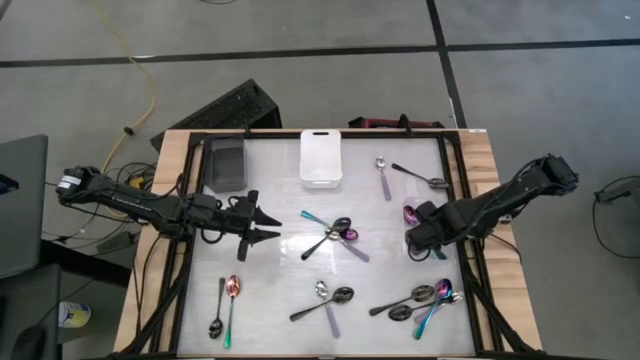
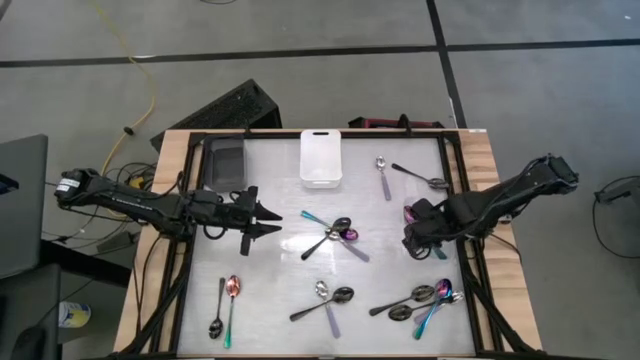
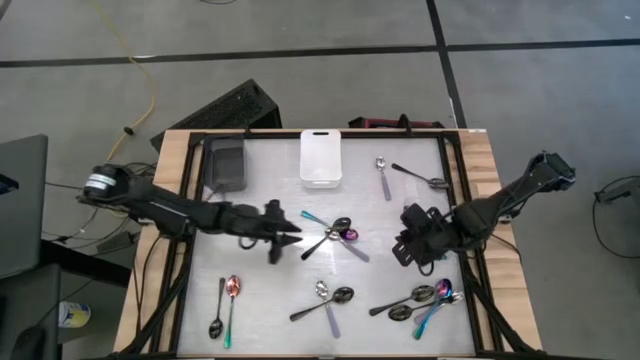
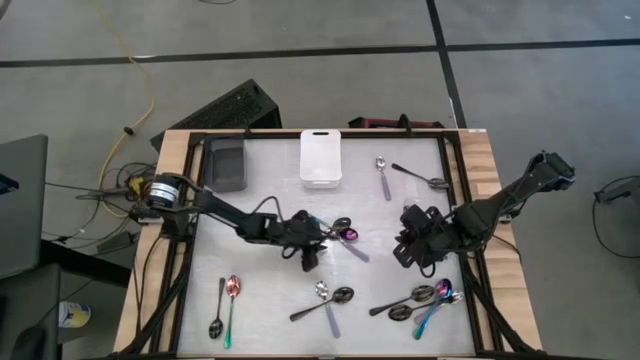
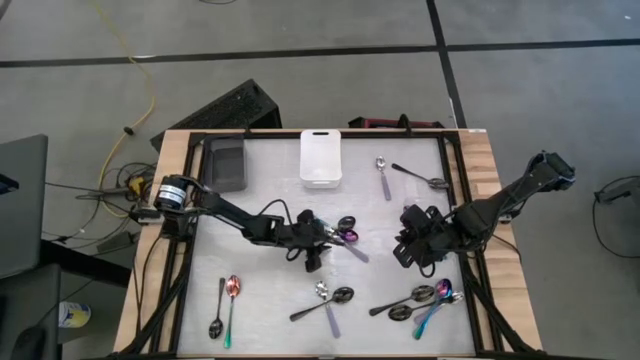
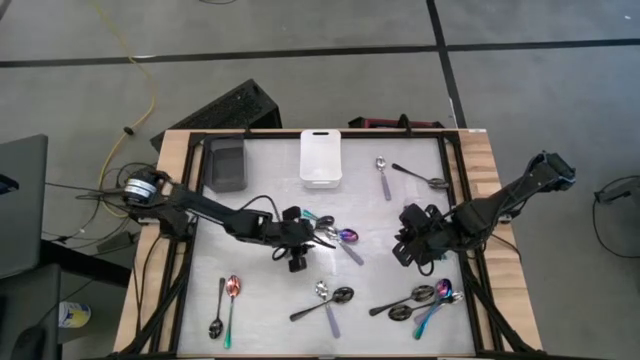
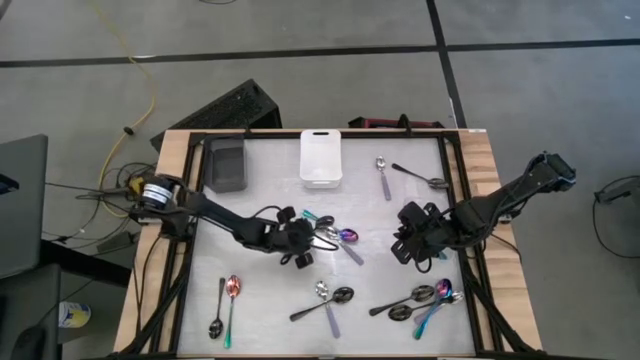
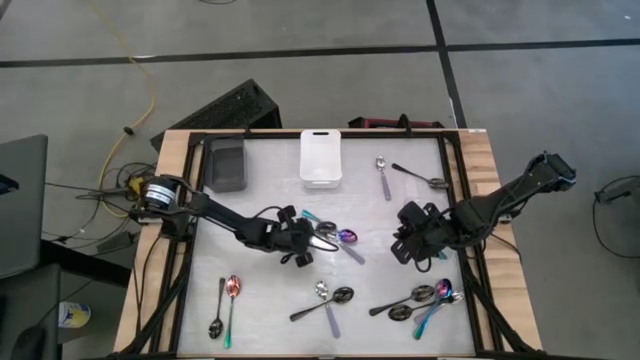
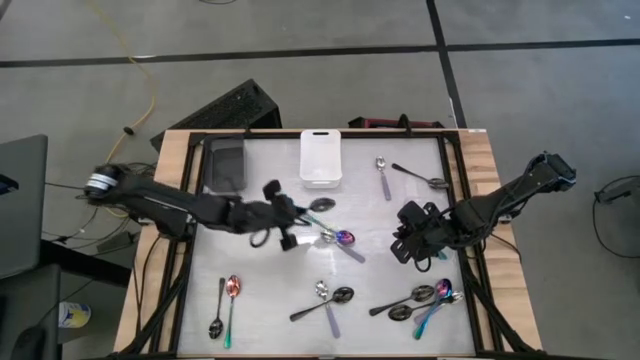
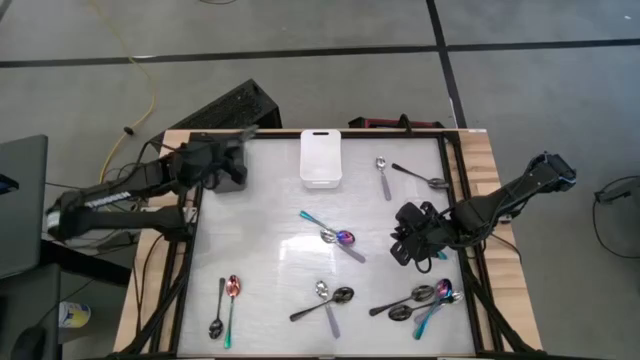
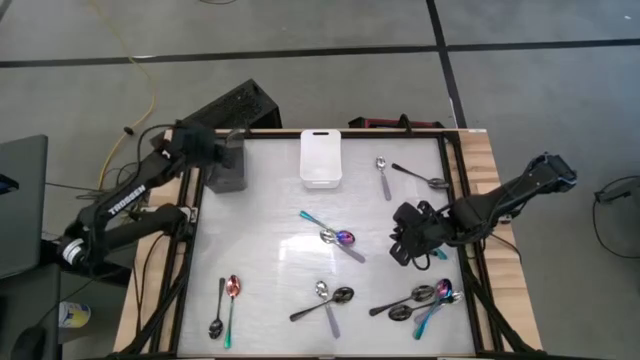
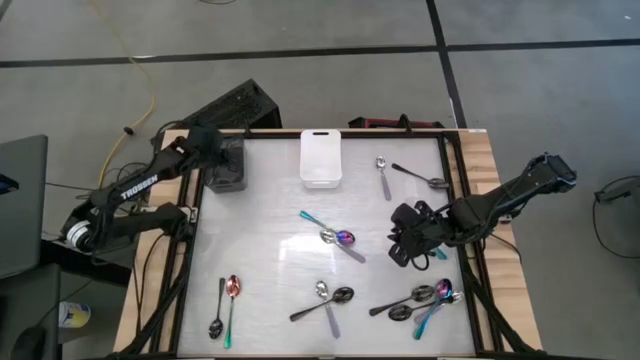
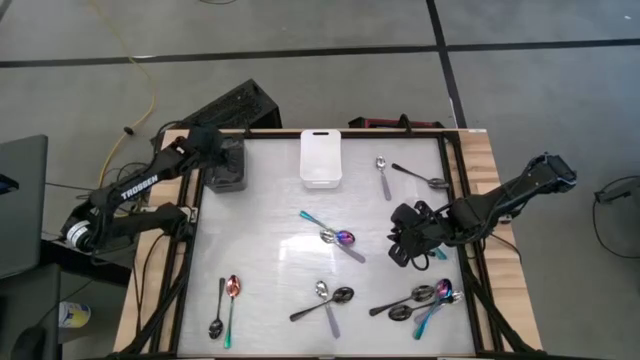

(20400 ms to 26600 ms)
Task: Sort silverware by color (type)
Put the black spoon into the black bin

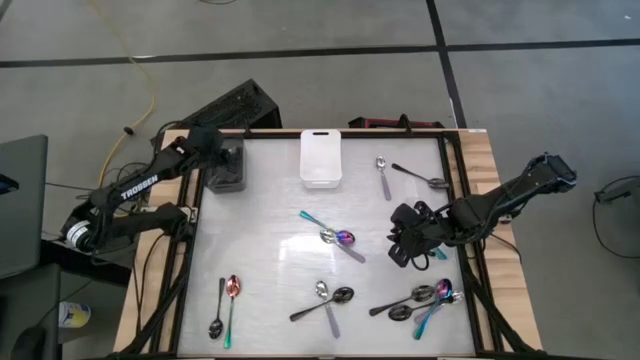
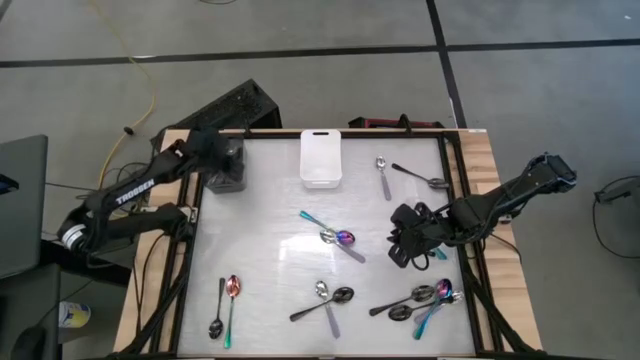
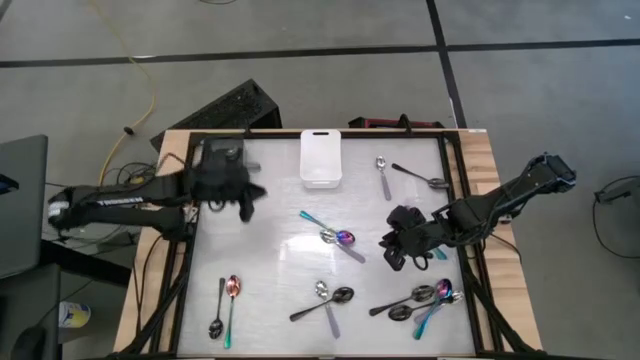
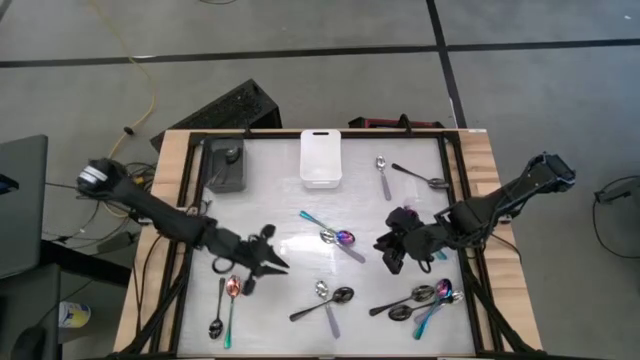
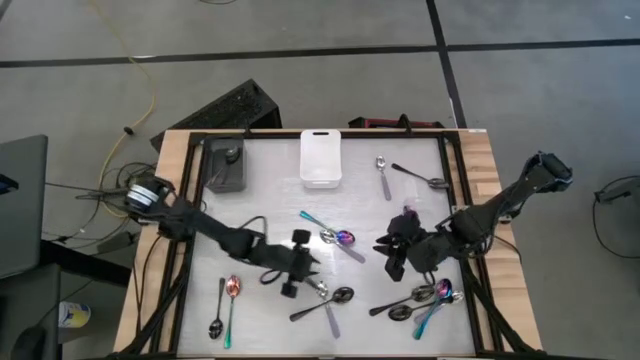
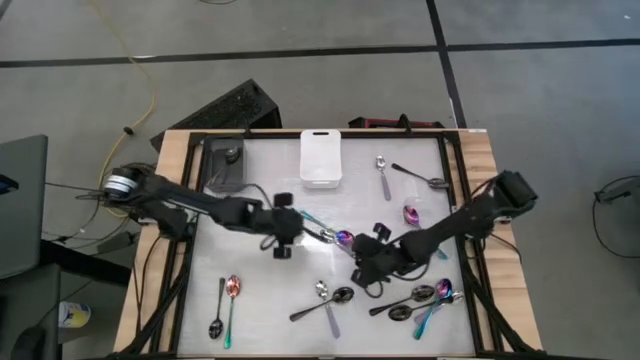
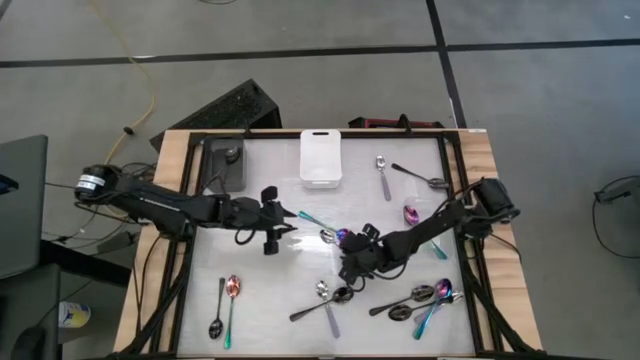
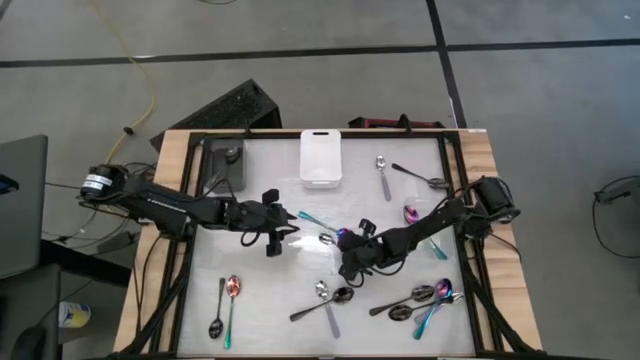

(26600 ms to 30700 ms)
Put the purple spoon into the white bin

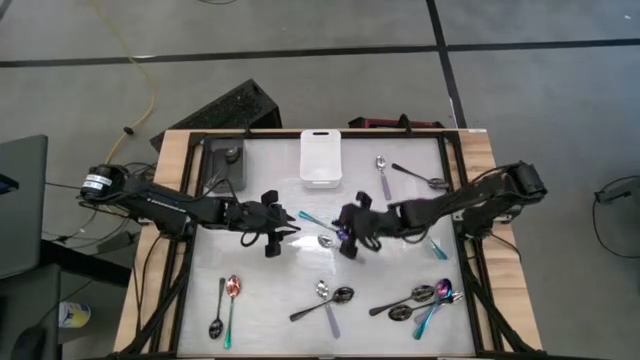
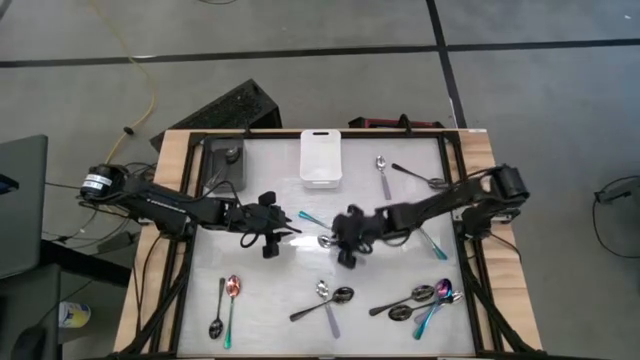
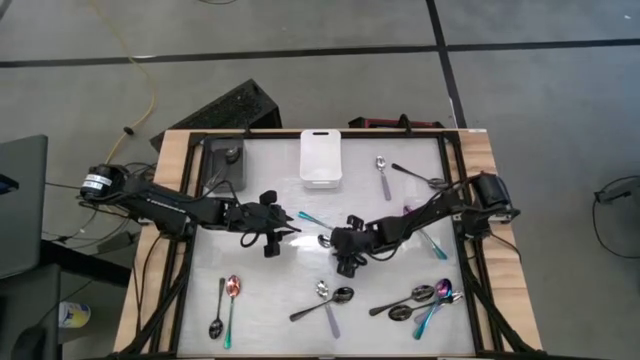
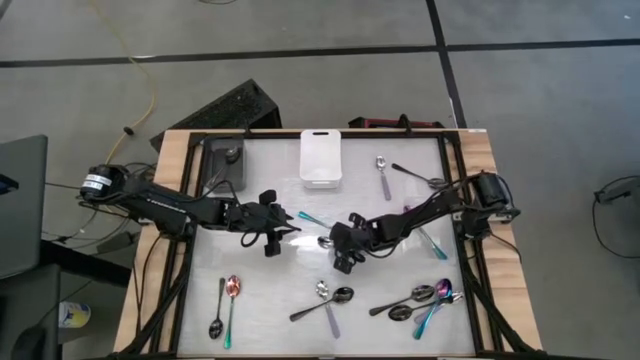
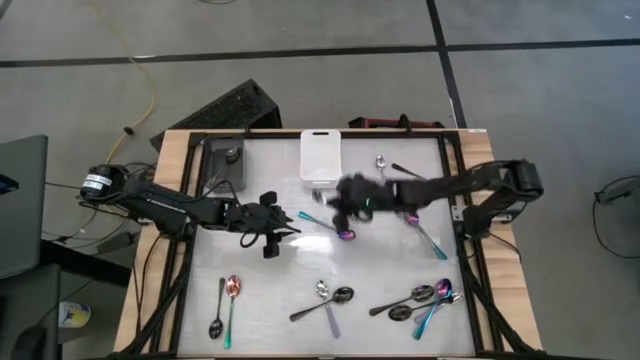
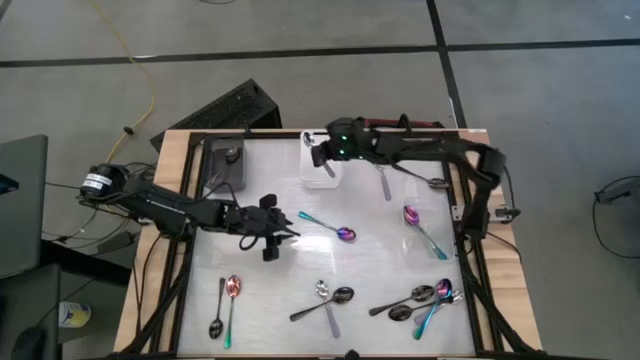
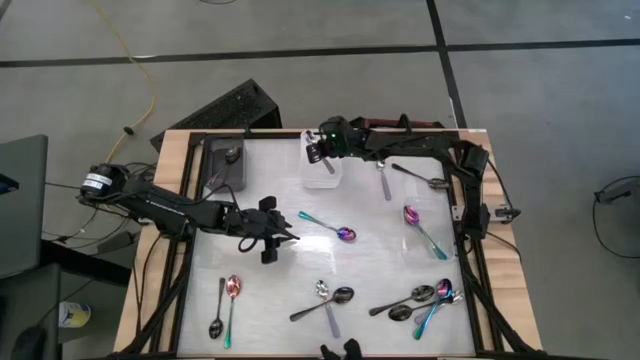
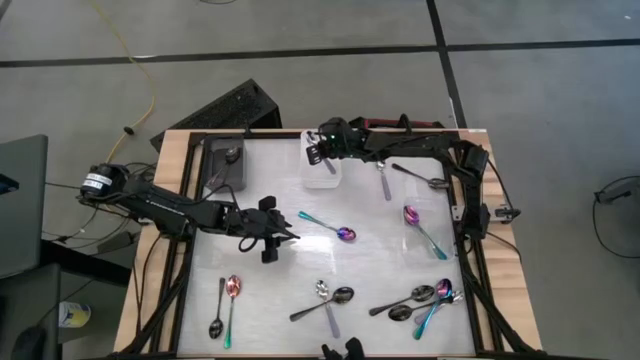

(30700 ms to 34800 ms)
Put the purple spoon into the white bin

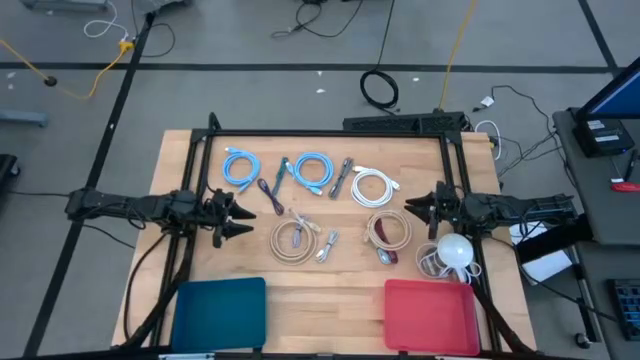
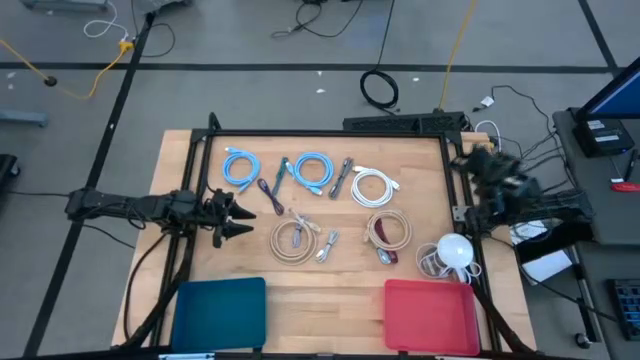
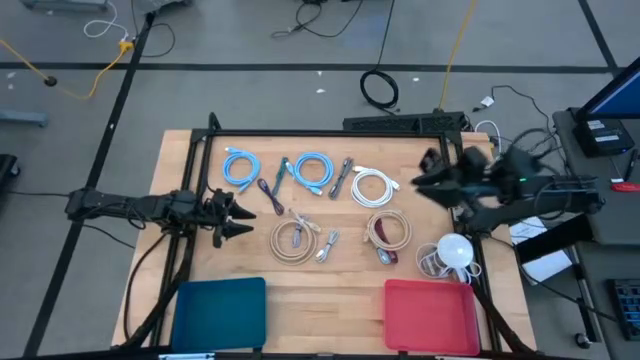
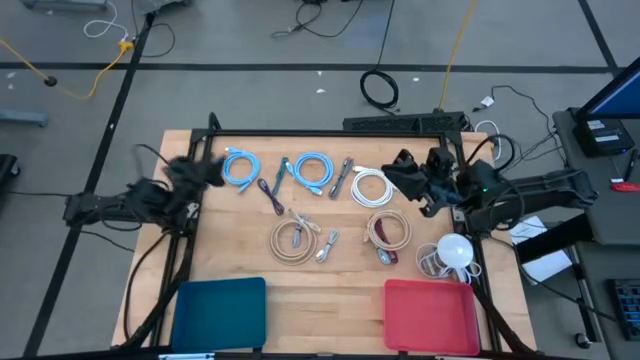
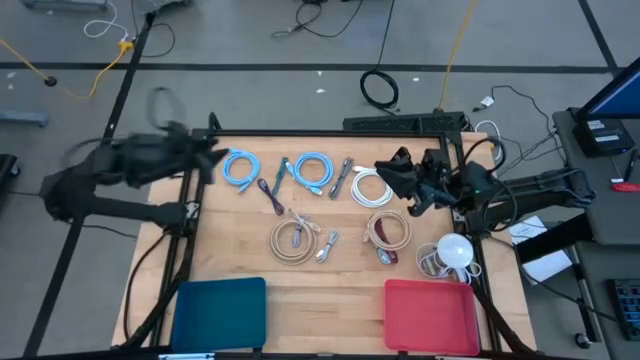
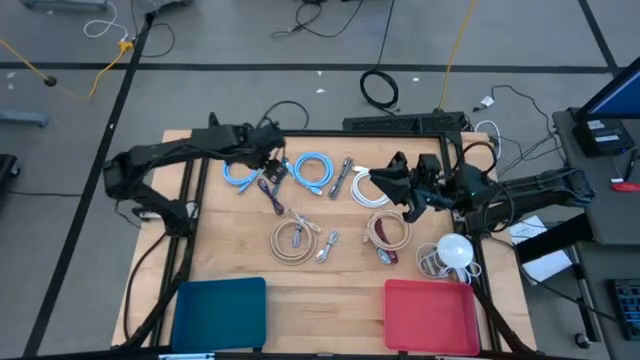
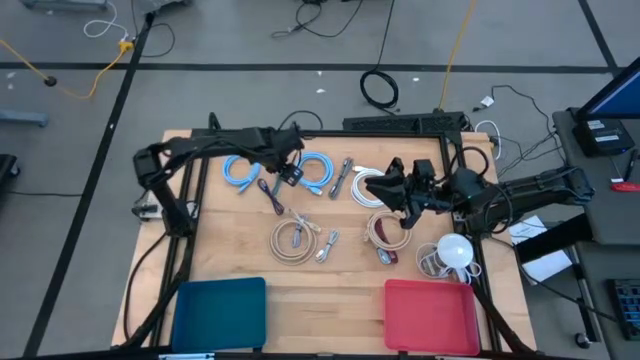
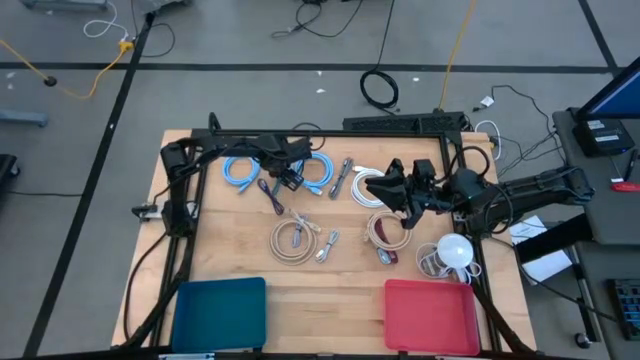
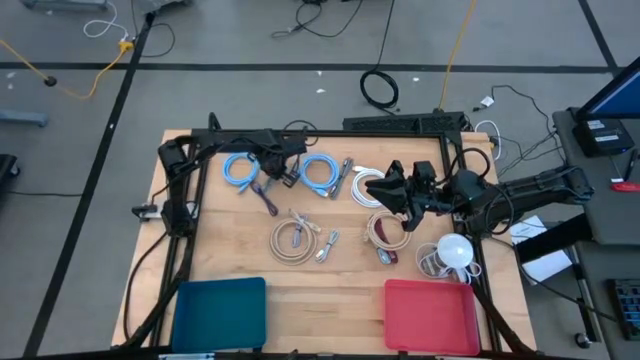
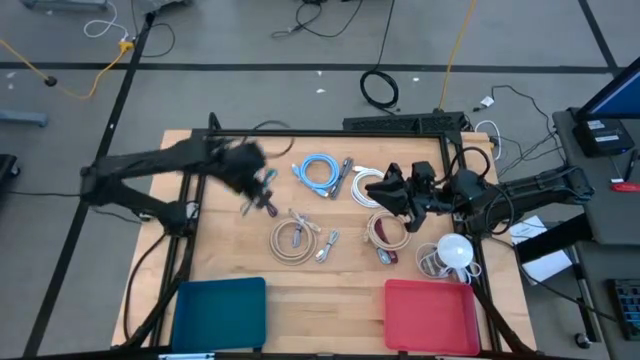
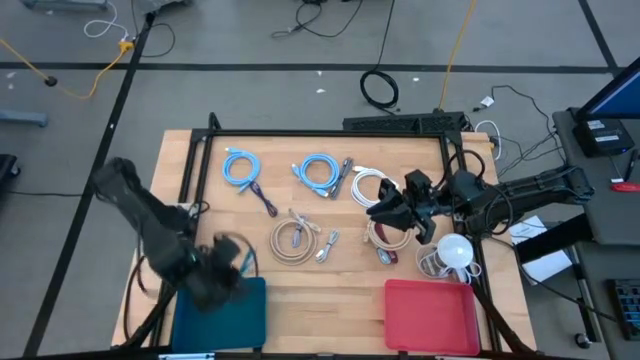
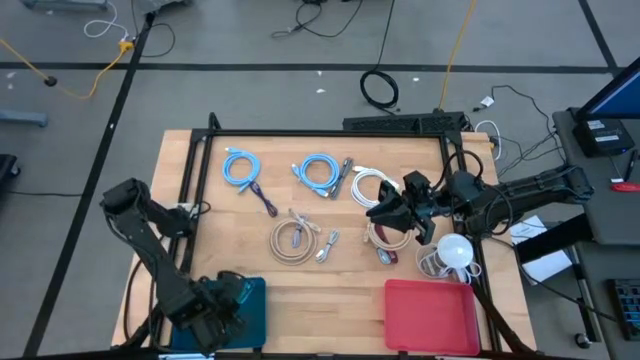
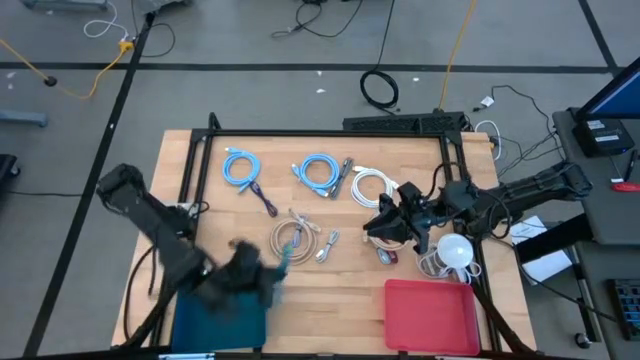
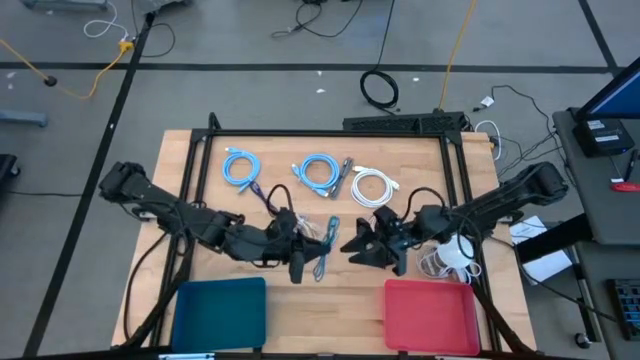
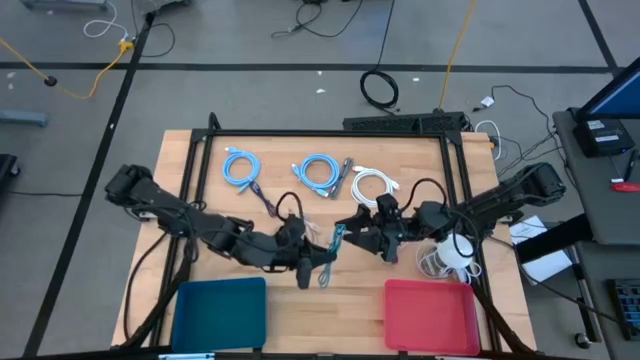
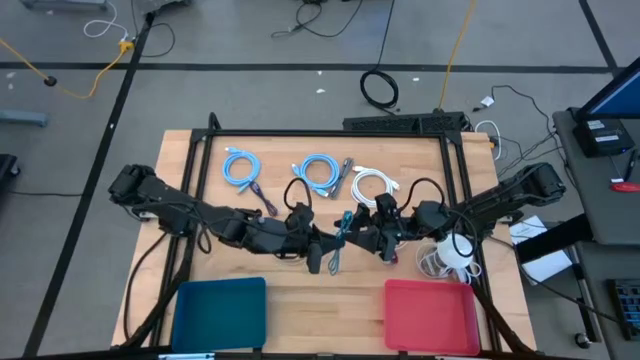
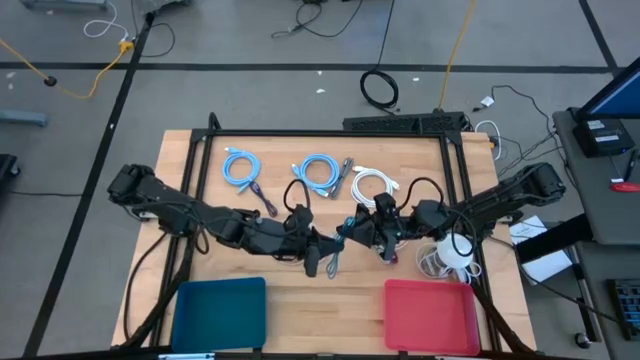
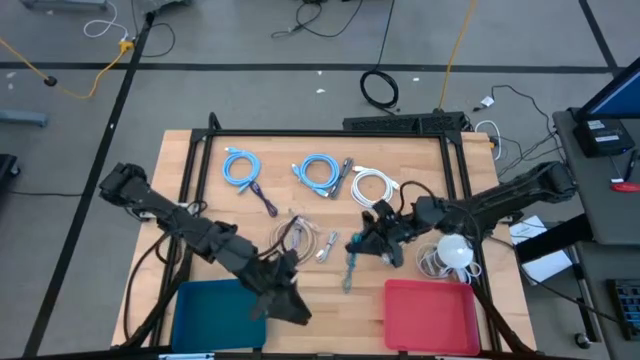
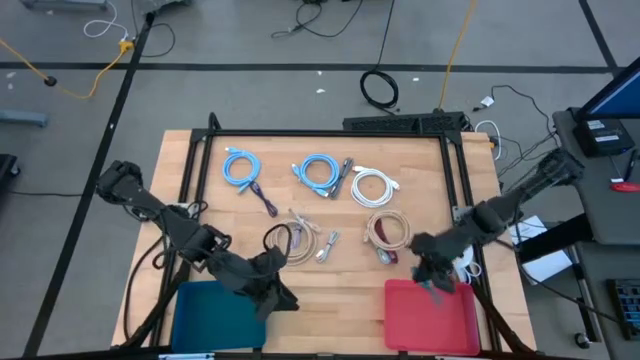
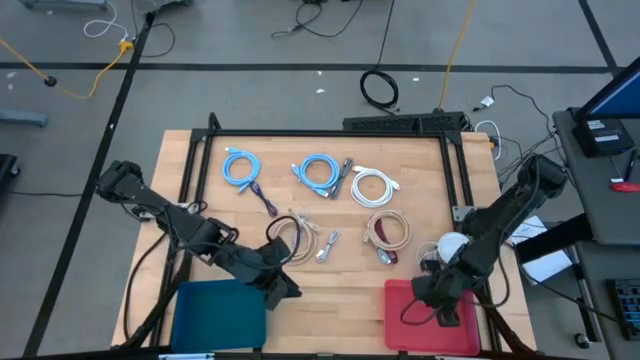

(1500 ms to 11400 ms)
Task: Pick & Place USB Port
Put the blue and black charger cable into the pink bin
